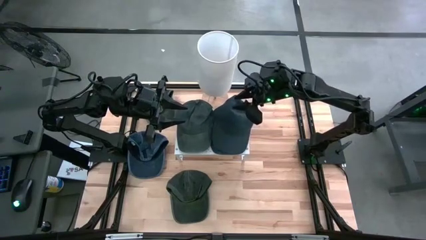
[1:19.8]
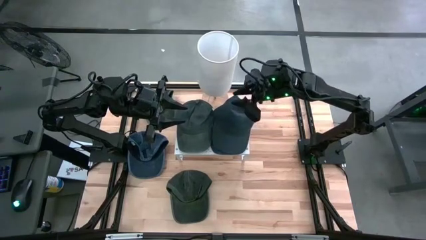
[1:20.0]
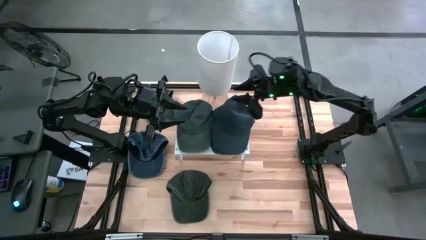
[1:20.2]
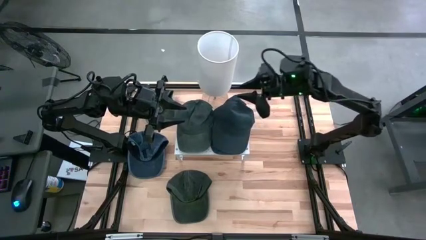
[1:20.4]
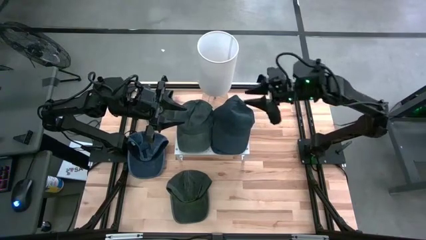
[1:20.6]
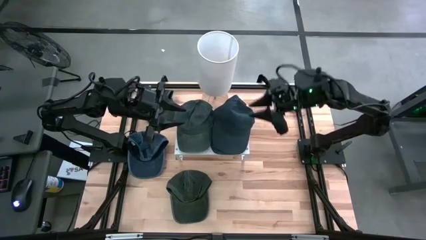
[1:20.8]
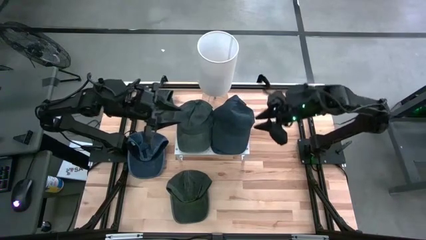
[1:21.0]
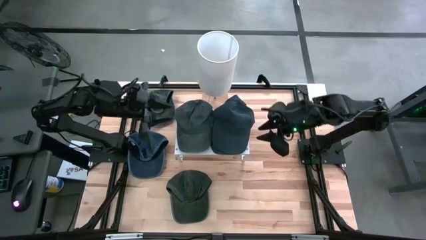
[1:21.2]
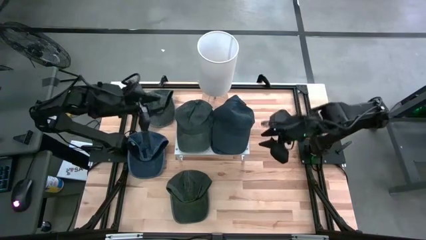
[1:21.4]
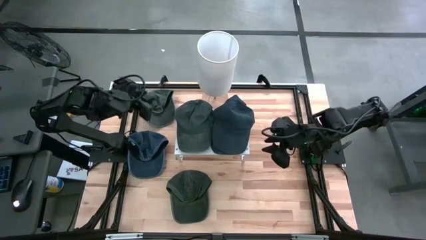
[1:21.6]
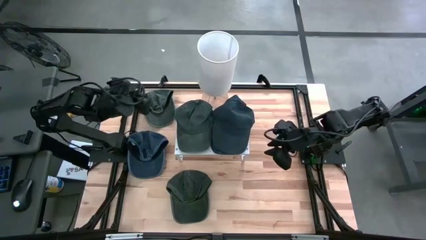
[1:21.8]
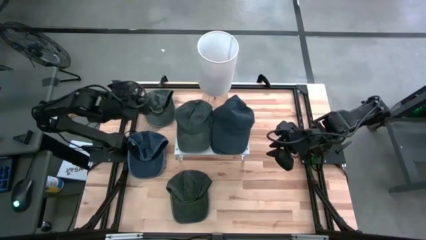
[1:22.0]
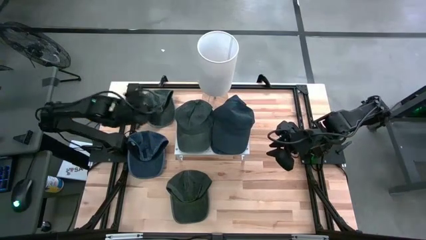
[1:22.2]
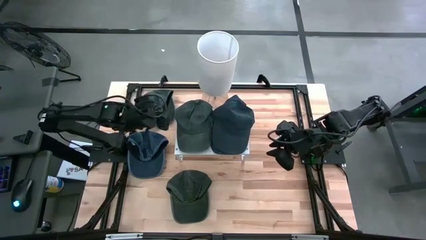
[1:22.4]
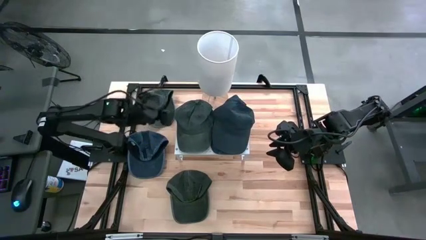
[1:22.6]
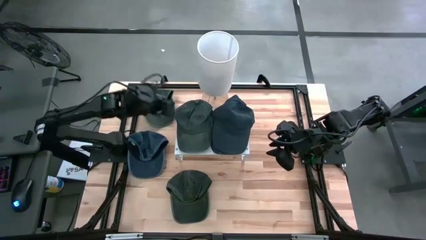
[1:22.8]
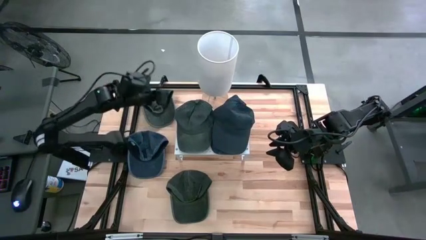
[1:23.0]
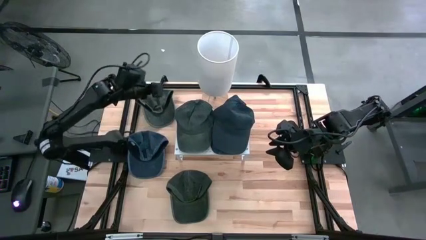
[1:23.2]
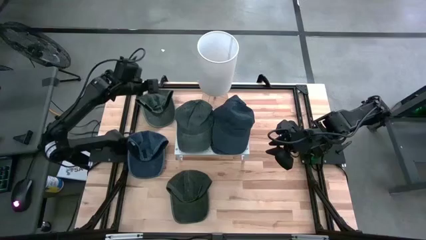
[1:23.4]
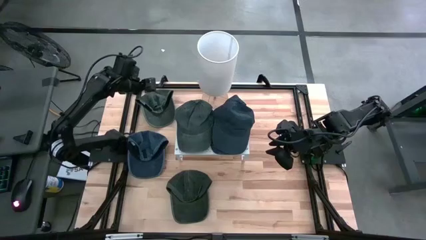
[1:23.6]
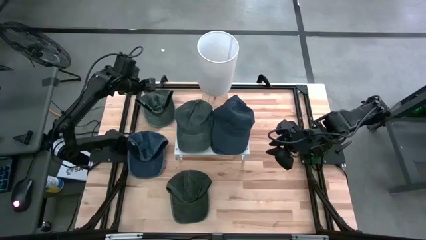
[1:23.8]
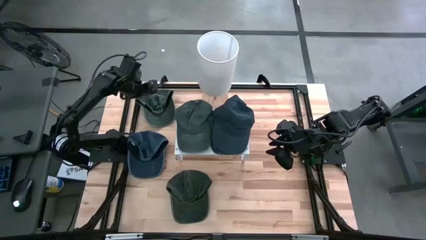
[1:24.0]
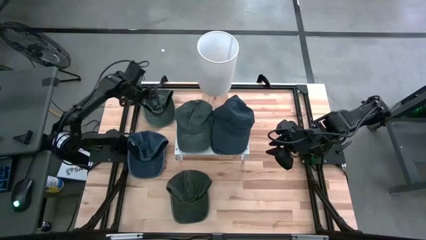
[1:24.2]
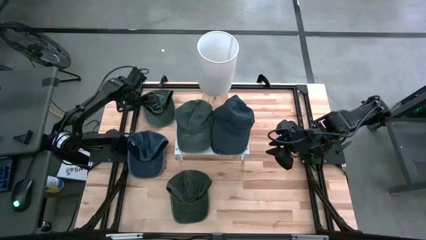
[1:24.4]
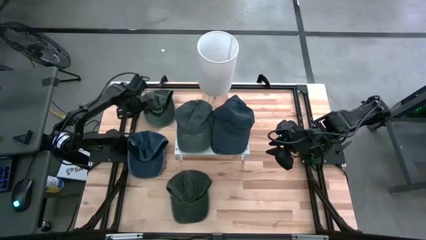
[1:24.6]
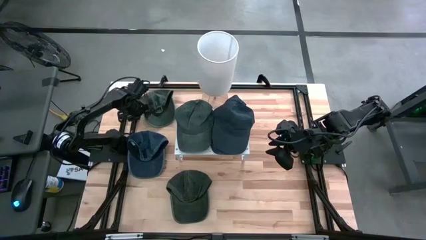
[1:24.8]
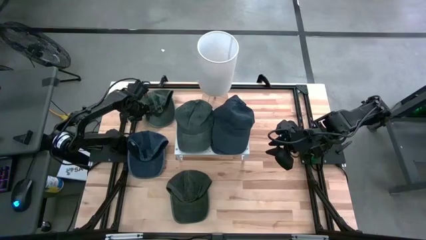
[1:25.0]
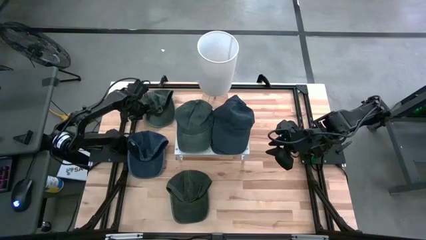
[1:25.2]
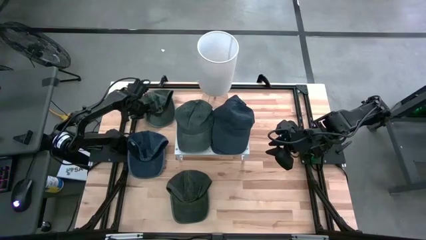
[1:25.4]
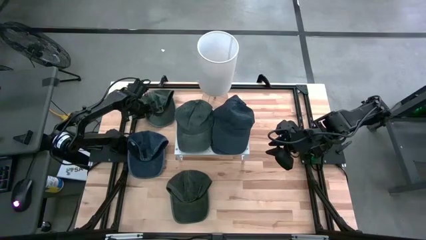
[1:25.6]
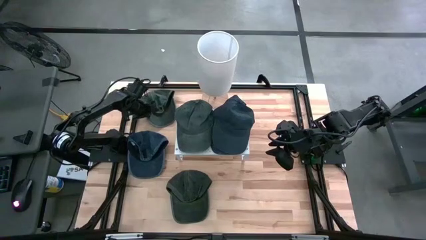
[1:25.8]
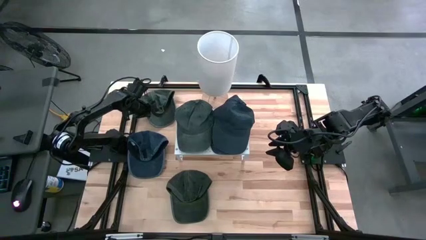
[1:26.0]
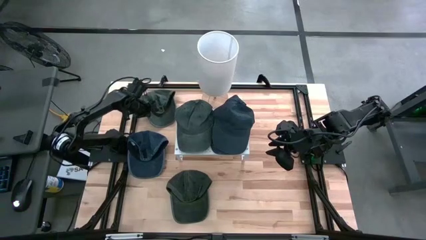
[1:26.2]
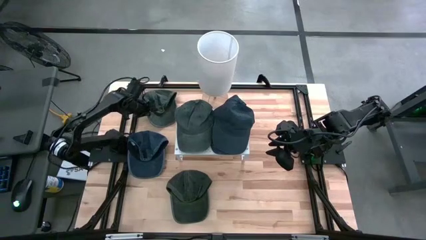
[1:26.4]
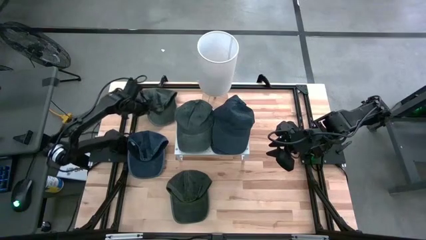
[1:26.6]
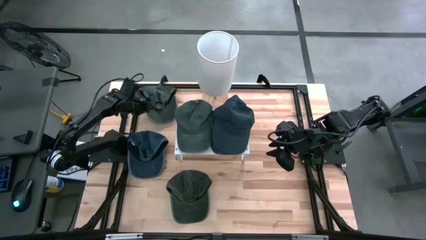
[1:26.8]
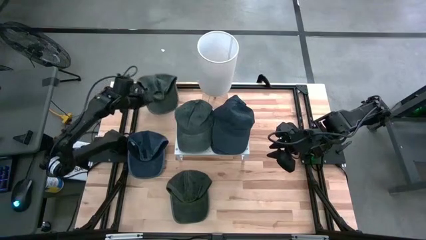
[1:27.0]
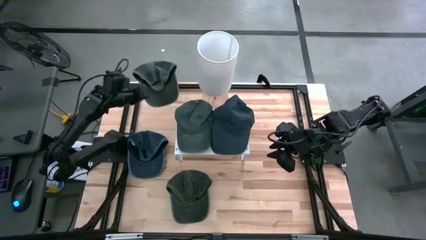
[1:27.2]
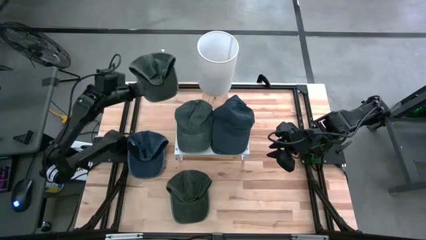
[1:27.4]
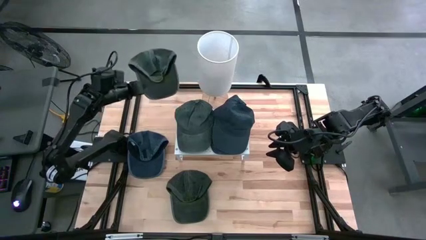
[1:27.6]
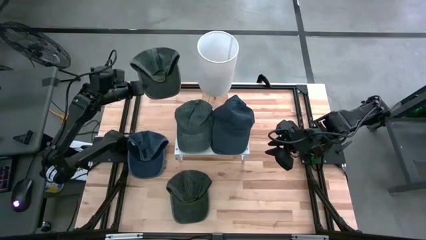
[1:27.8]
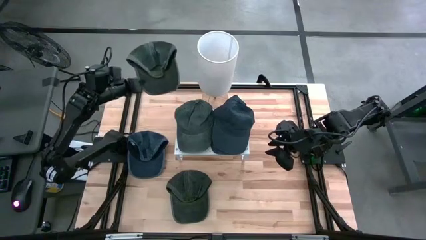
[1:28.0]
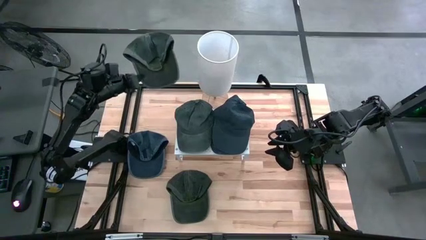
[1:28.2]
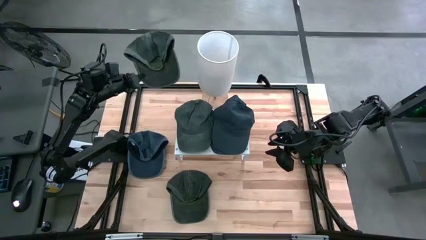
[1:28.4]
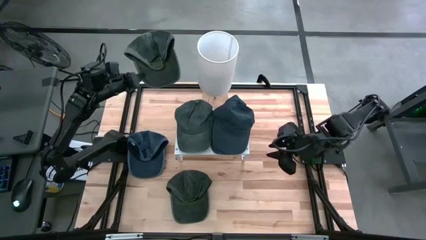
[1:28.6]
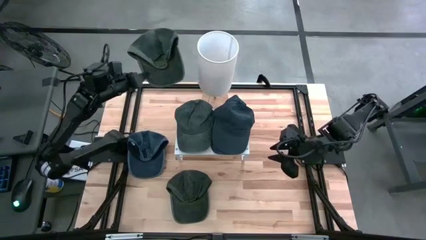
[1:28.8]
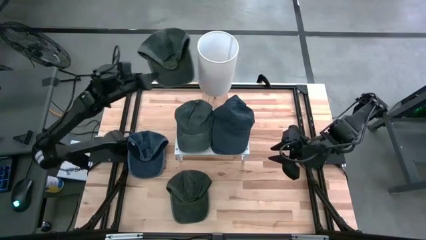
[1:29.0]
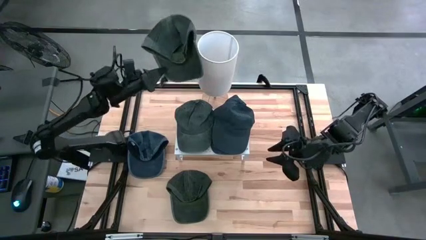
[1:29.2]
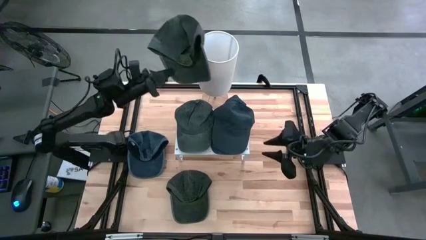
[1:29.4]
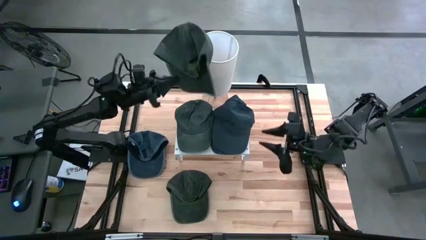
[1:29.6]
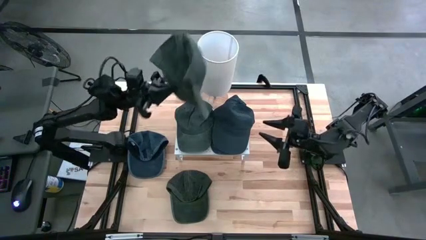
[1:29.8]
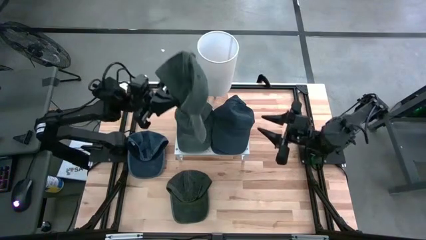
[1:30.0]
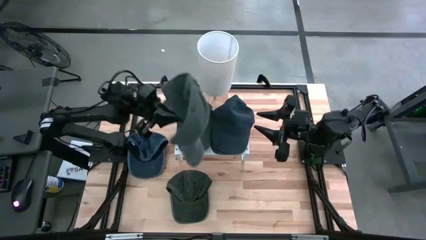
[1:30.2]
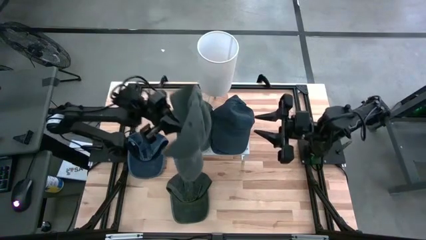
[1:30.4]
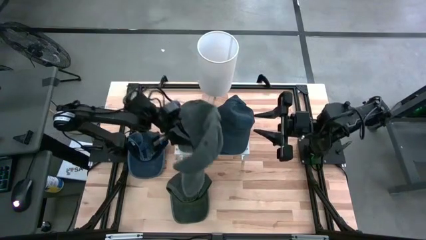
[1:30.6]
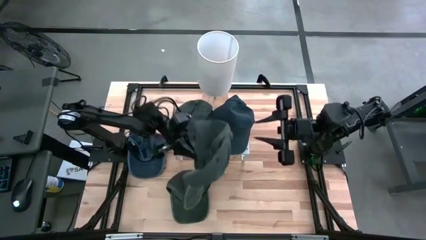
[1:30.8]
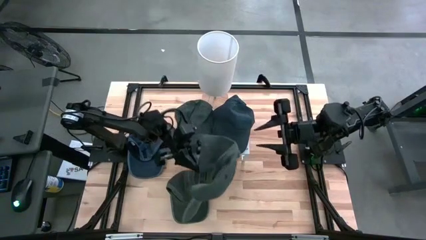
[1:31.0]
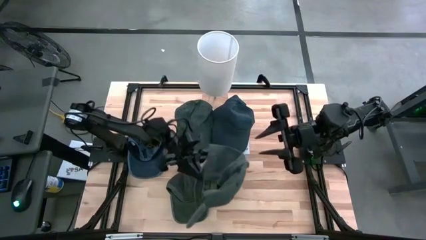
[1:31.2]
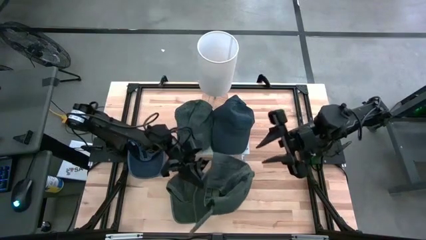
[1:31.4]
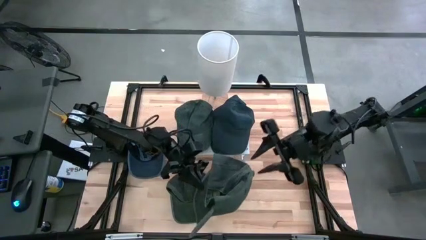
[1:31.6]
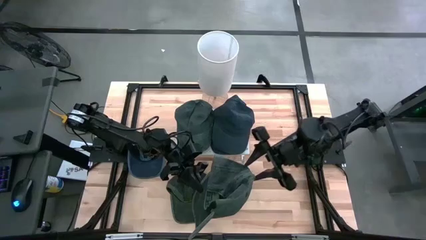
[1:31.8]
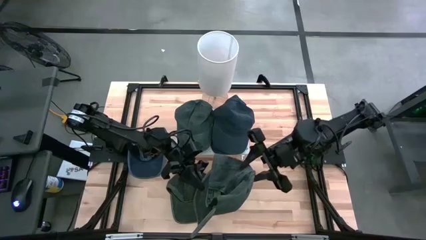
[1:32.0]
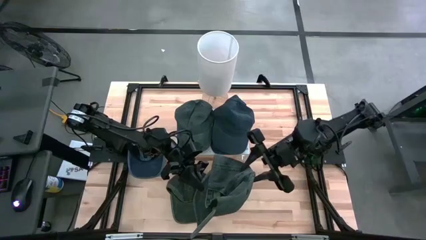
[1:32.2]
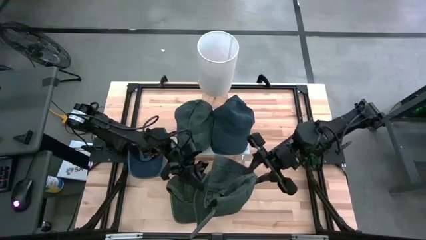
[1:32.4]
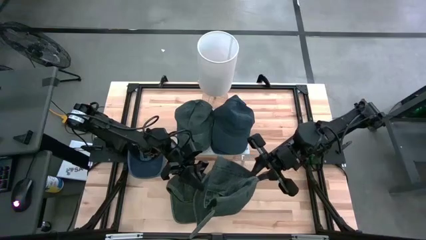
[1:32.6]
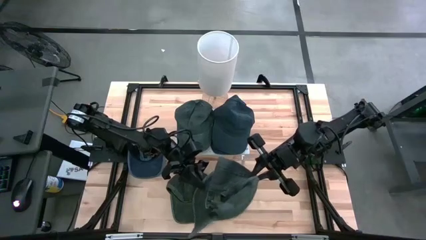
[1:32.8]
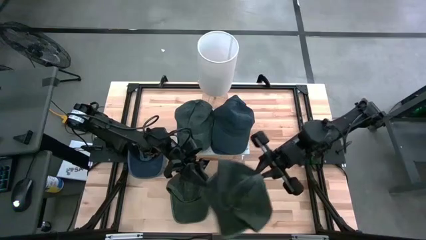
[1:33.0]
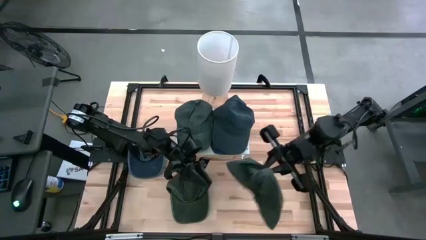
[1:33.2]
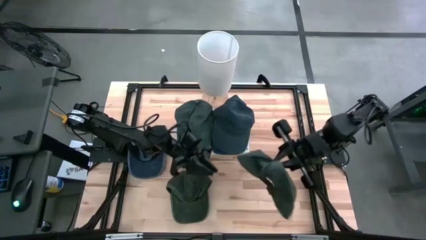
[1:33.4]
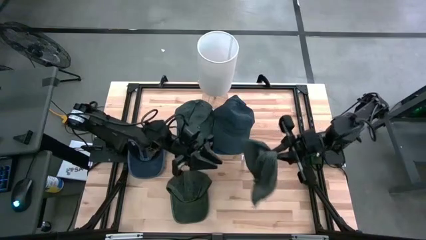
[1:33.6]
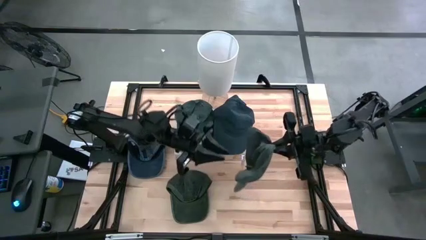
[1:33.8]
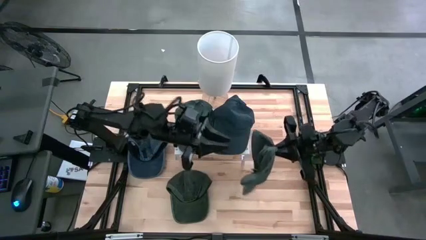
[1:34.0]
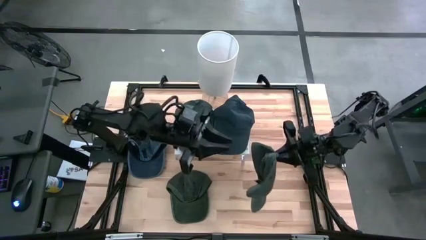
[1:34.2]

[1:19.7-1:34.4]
Task: Pick & Place hat
Stack the top green cap on the green cap on the shelf
